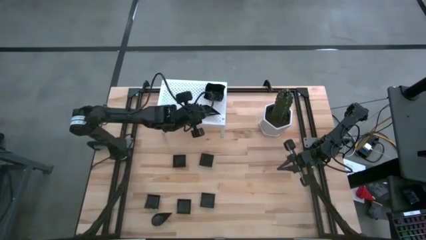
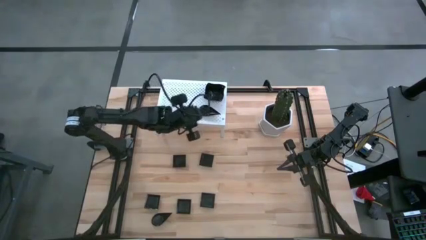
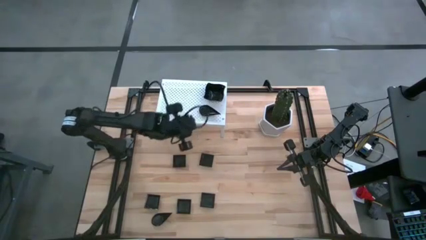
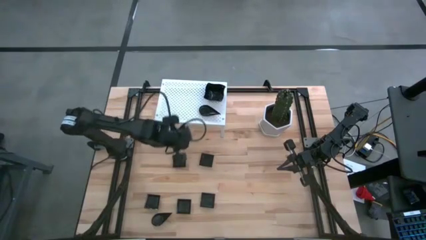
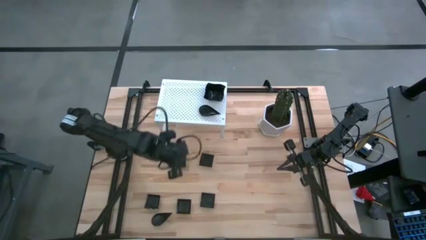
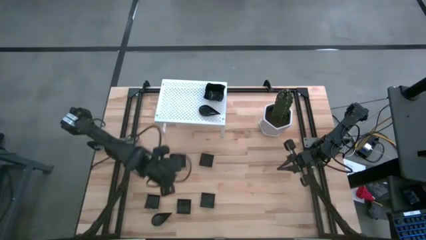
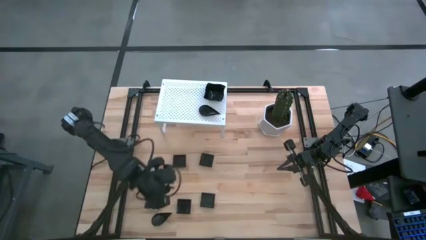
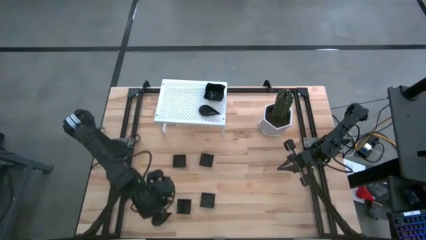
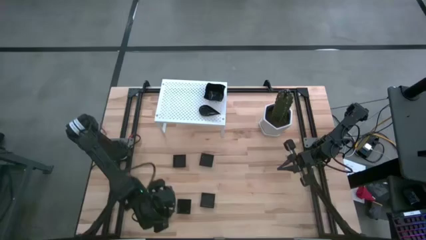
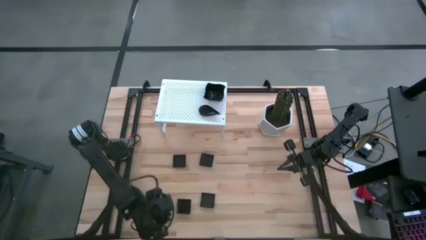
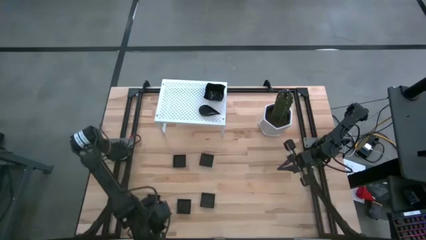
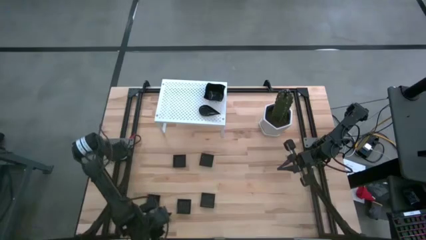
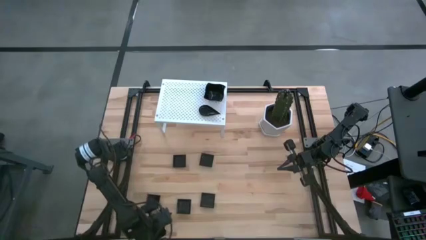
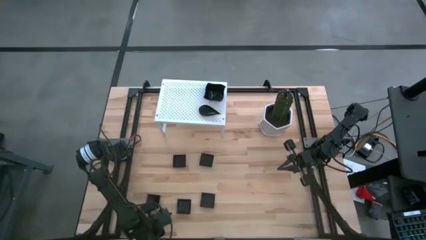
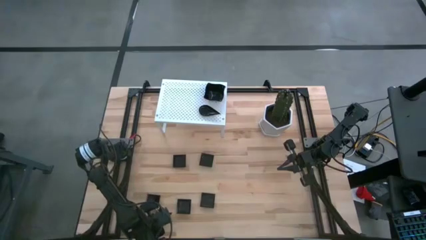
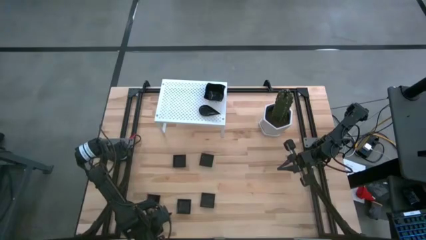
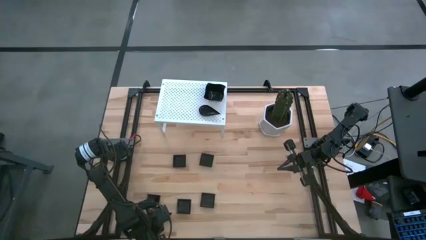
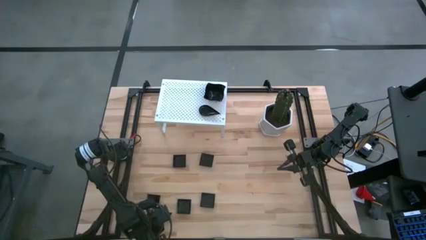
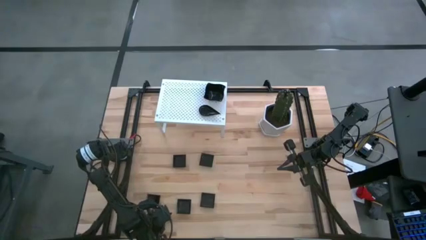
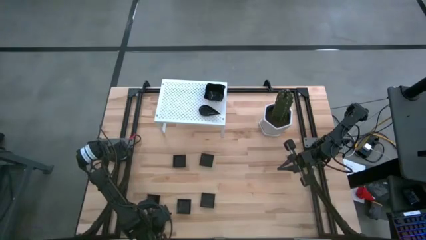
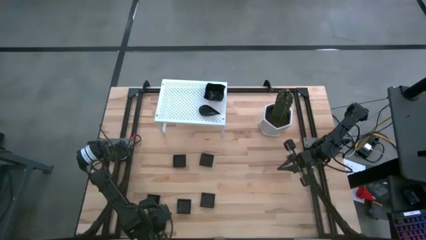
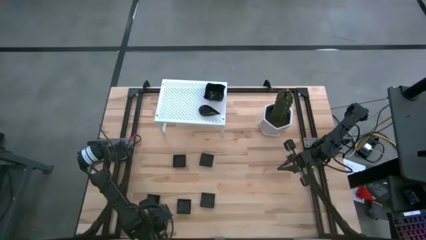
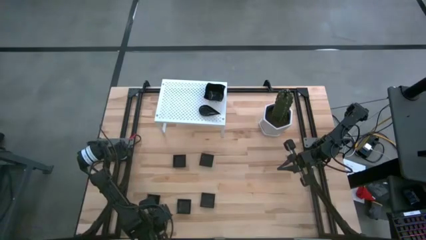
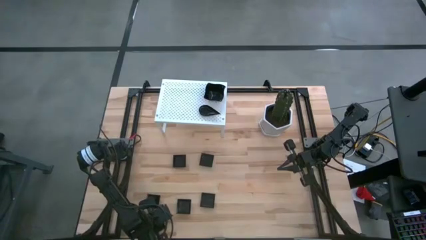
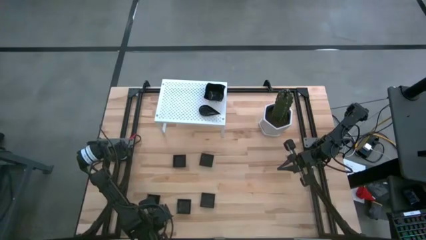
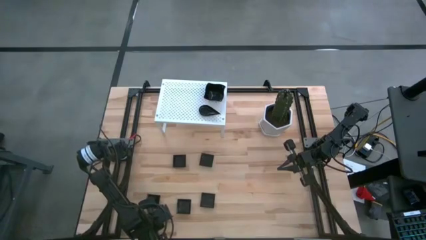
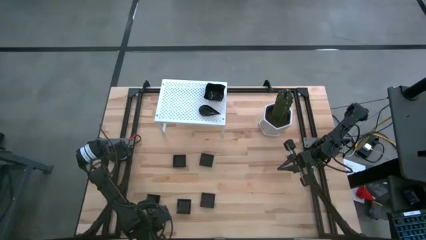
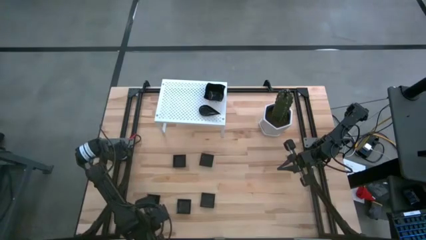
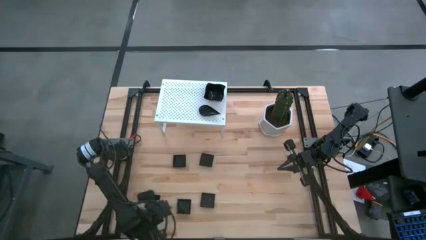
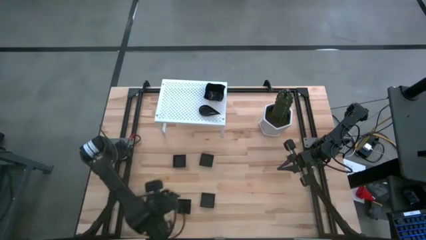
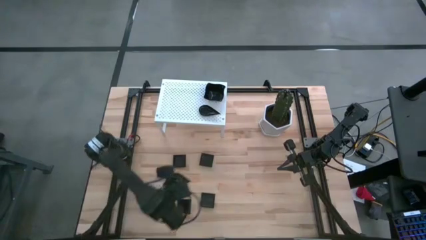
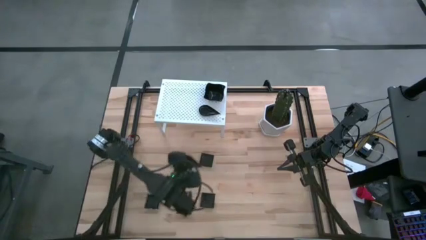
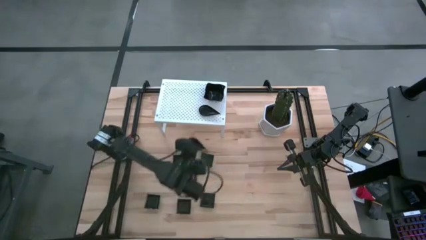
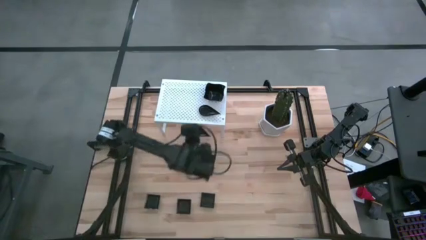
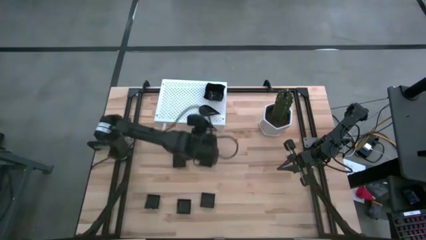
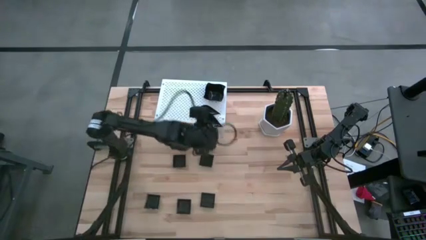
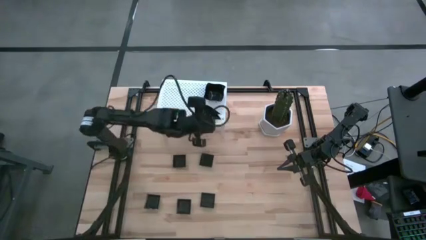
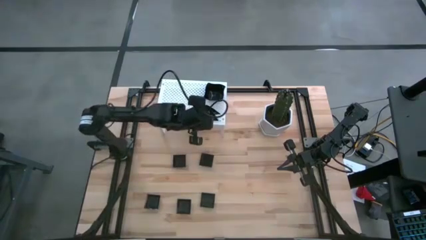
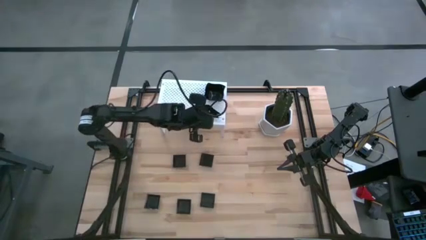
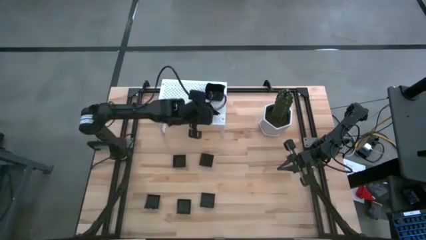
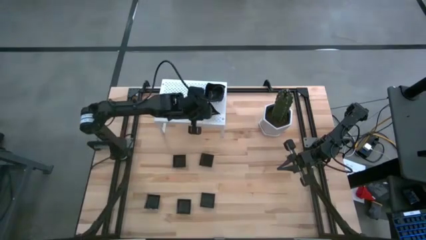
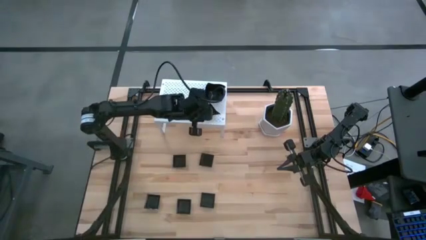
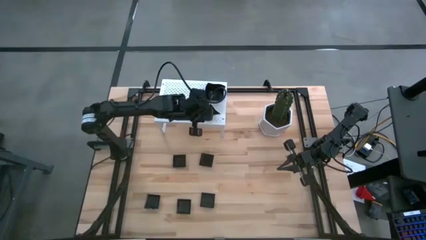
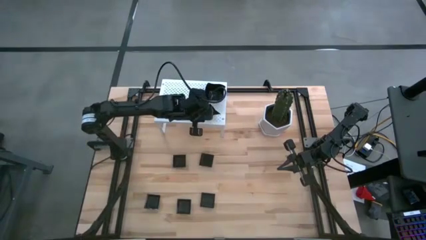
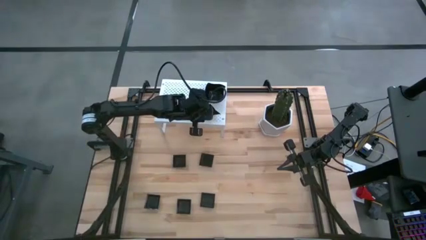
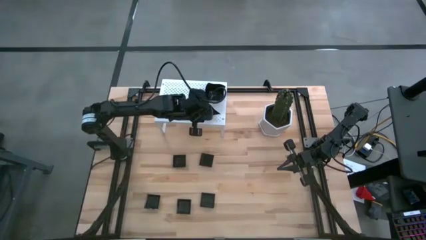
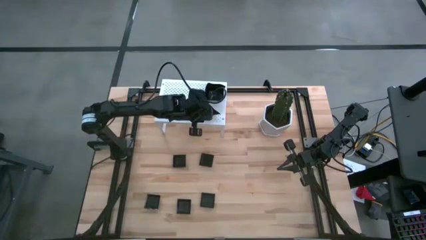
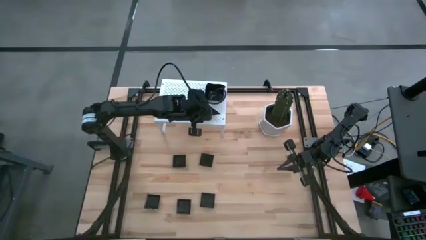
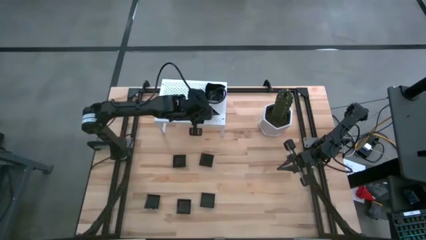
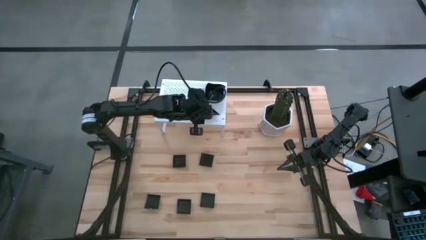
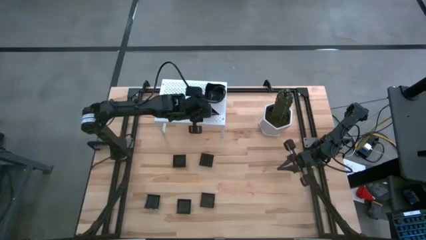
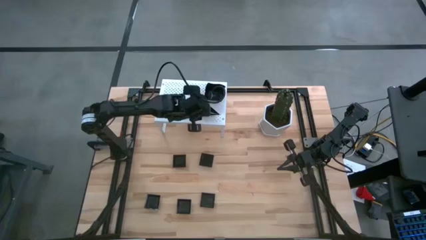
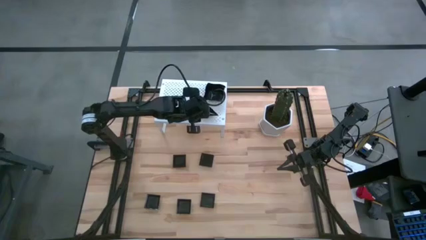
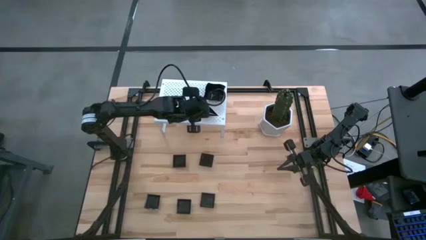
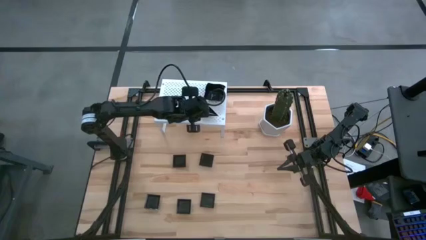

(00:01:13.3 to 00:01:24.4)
Task: Pick & Place Mini shaped plates
Stack the drop-shaped plate on top of the other drop-shaped plates on the shelf

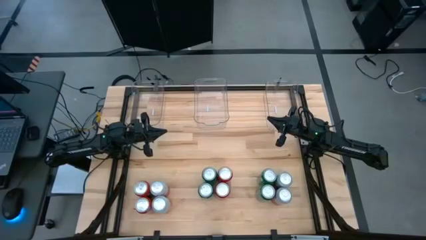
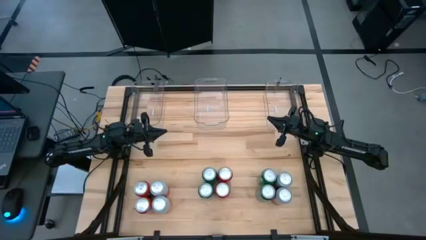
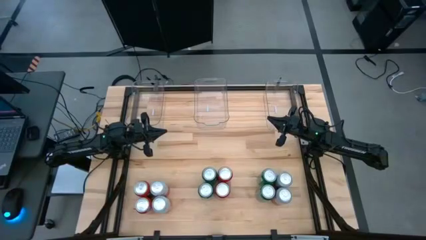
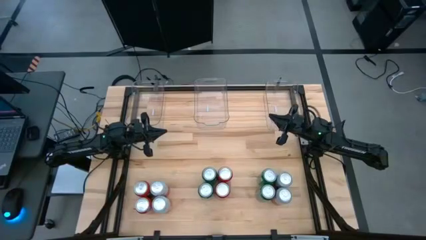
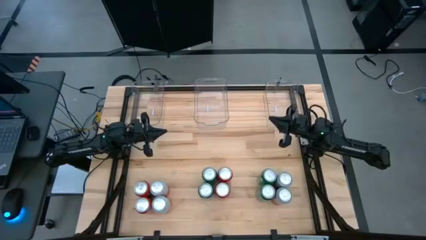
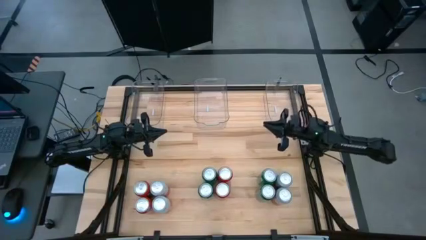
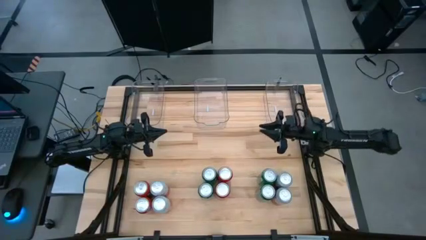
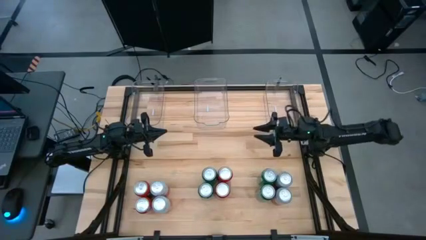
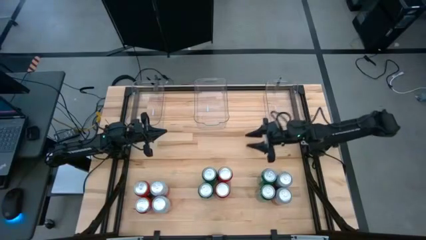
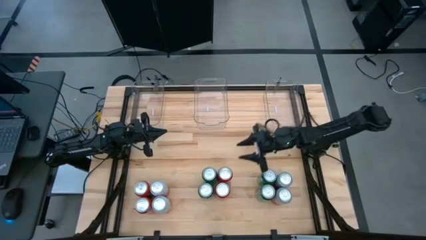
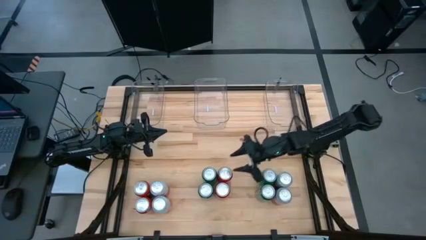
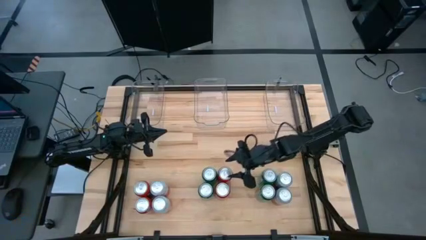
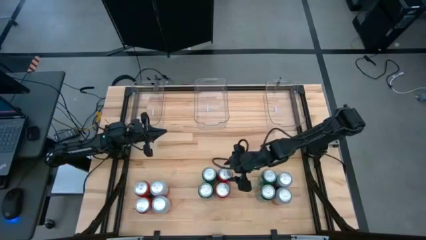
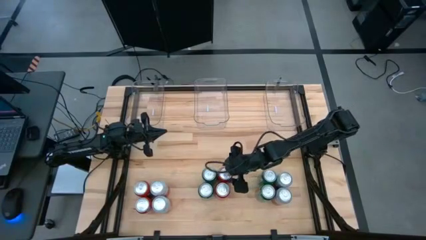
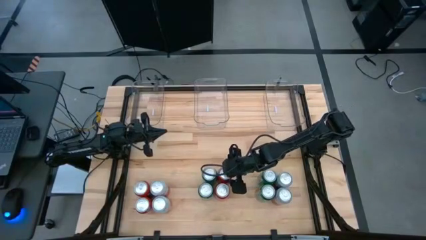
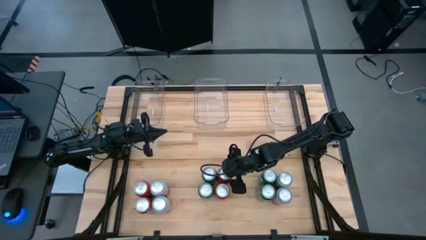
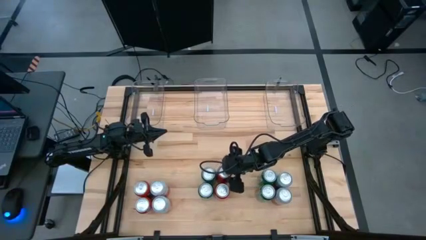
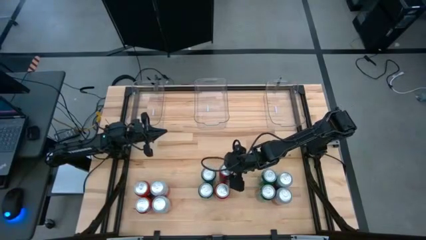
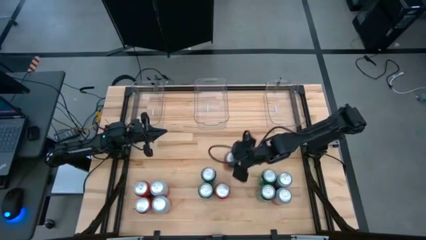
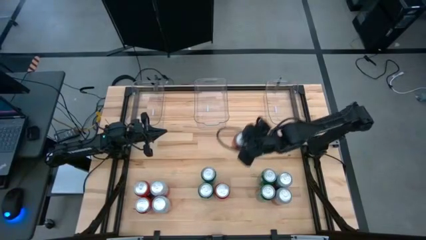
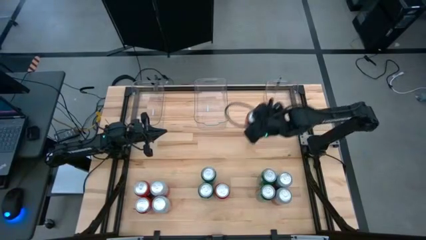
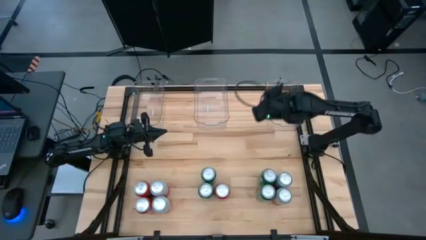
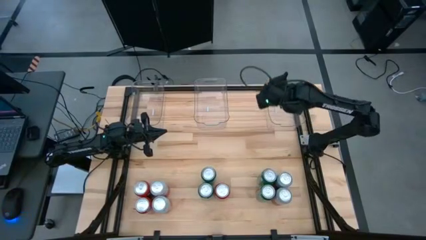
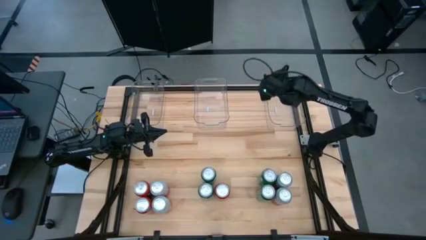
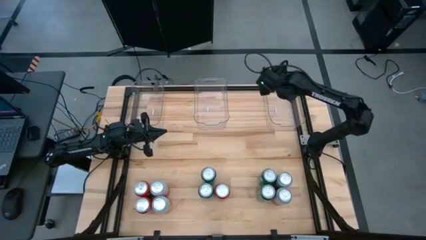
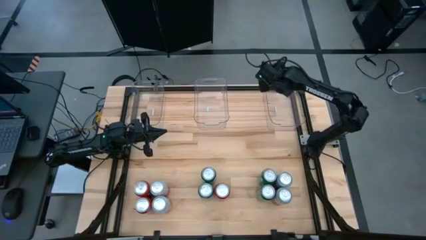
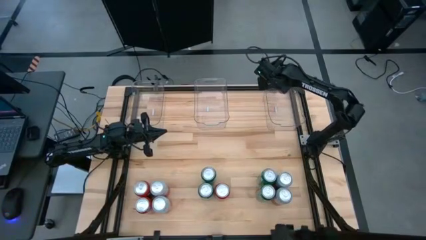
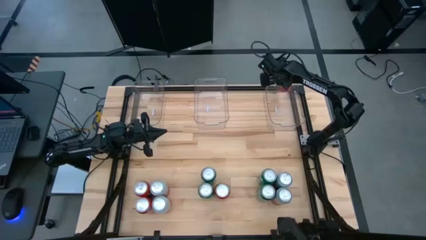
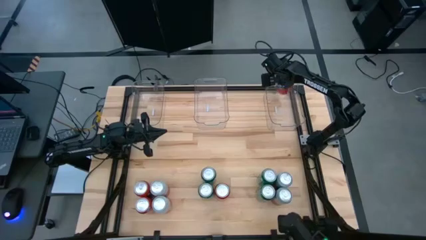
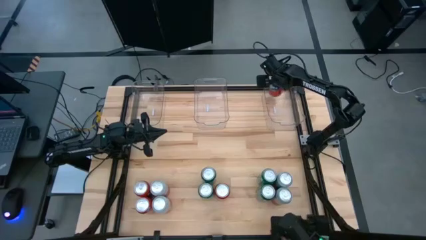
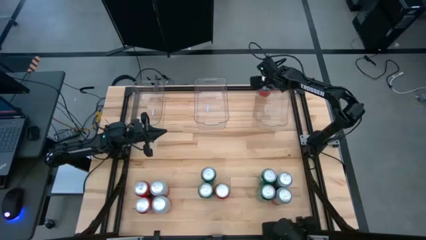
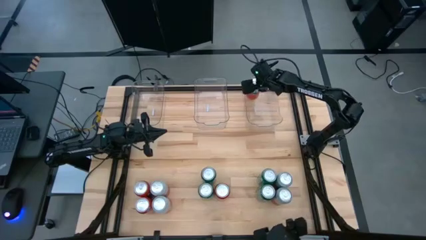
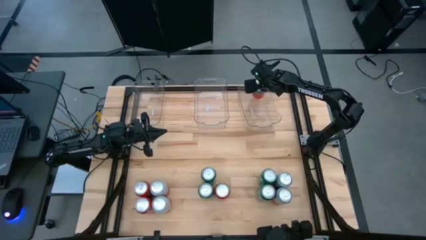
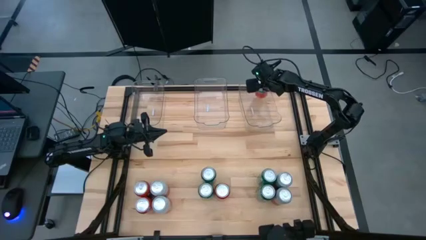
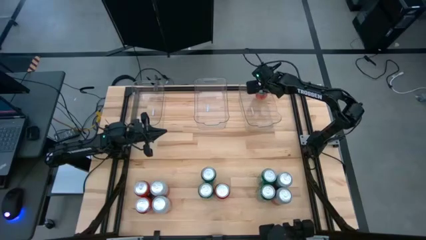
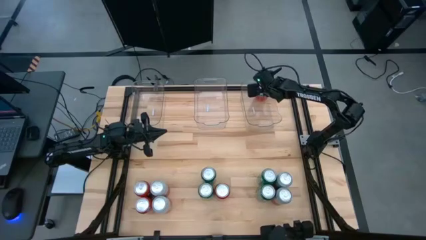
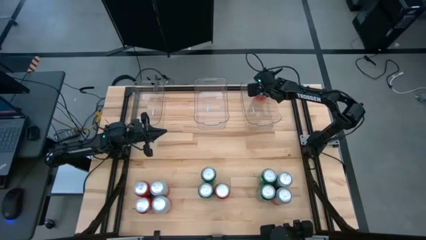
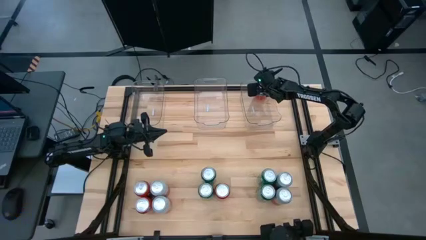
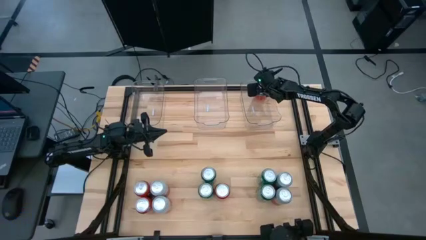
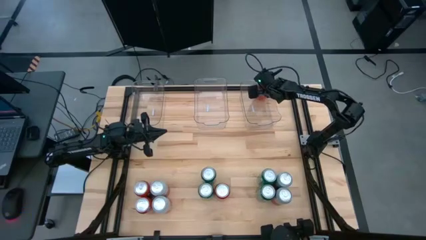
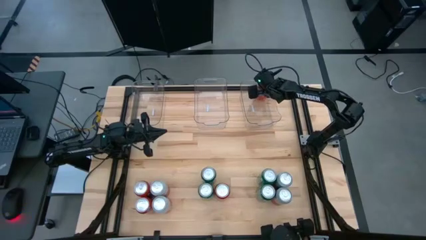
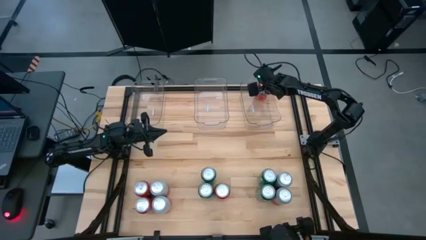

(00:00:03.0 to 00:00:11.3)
Task: Sort soda cans
Put the top right orange soda can into the right transparent bin
